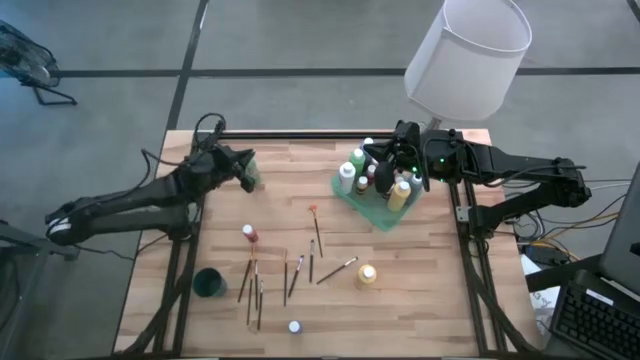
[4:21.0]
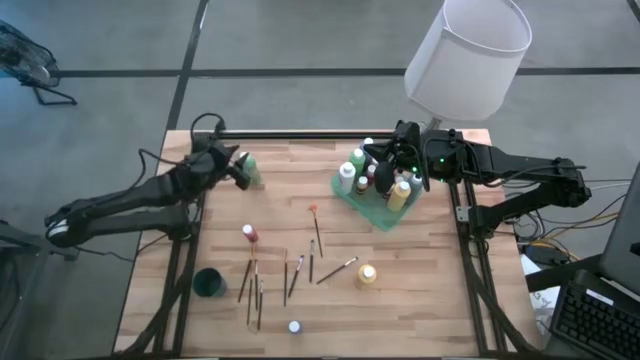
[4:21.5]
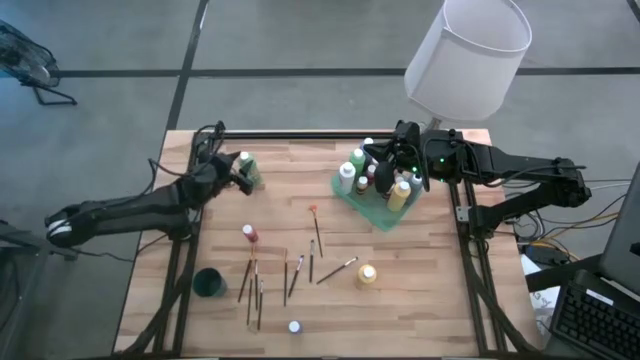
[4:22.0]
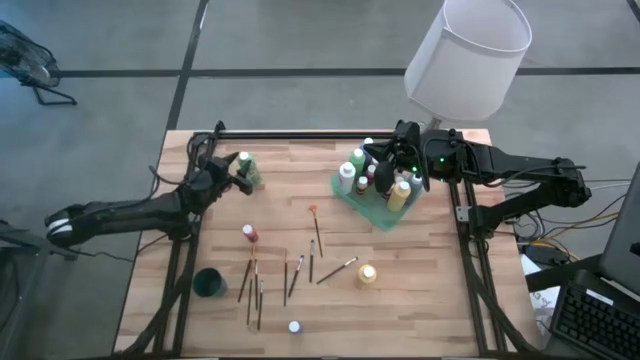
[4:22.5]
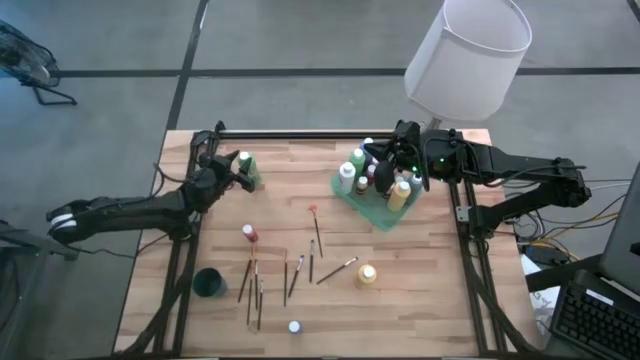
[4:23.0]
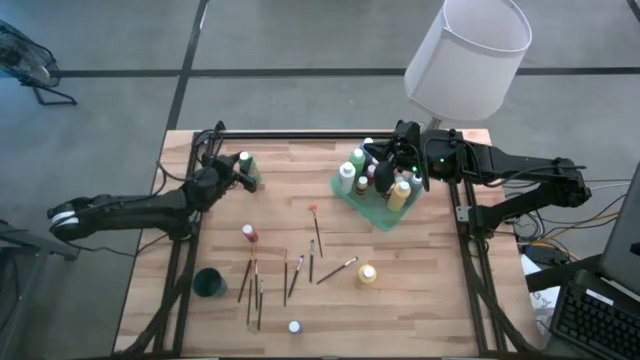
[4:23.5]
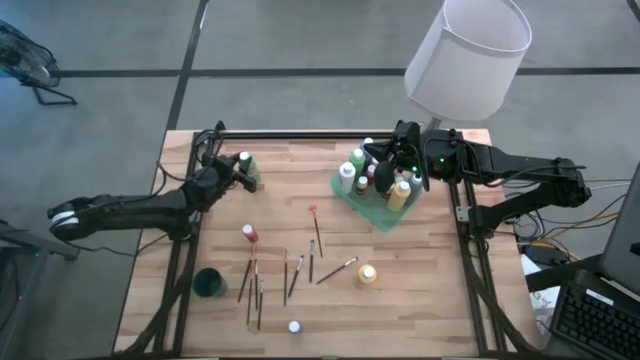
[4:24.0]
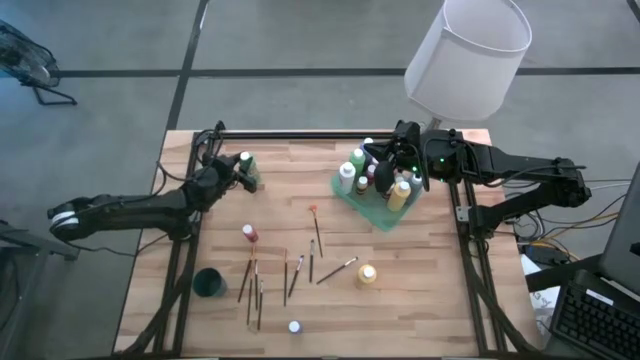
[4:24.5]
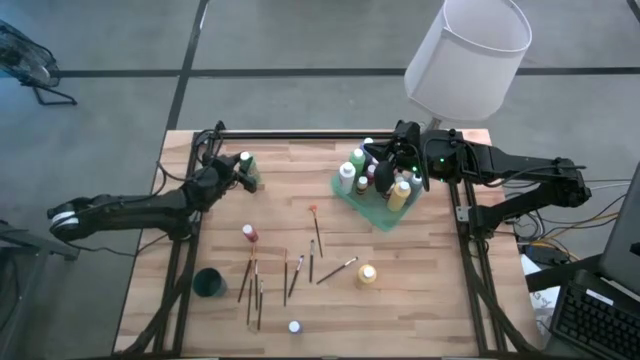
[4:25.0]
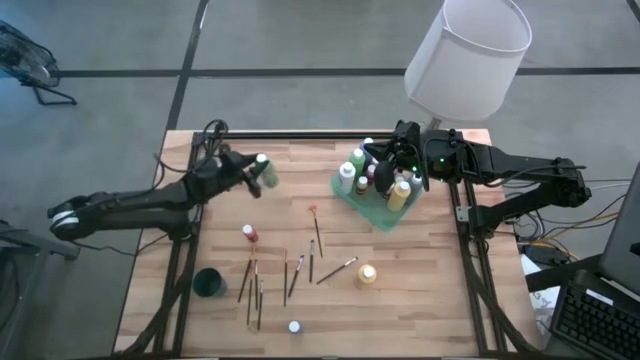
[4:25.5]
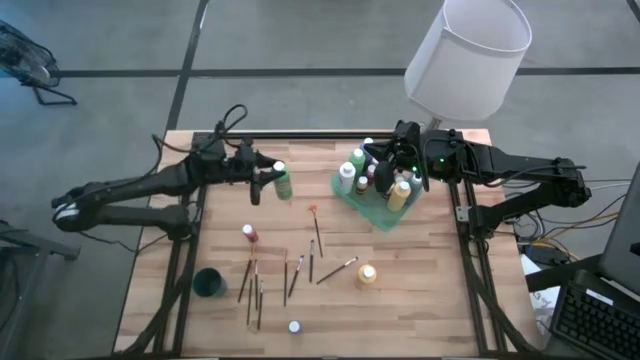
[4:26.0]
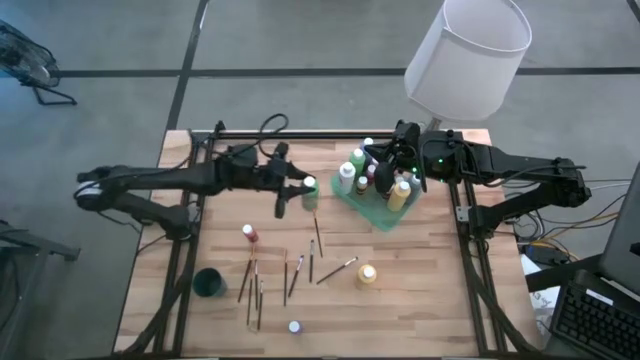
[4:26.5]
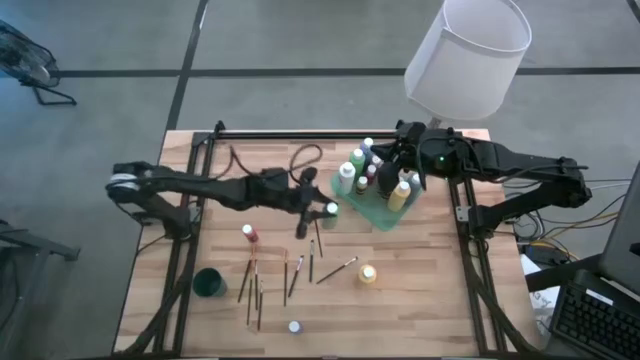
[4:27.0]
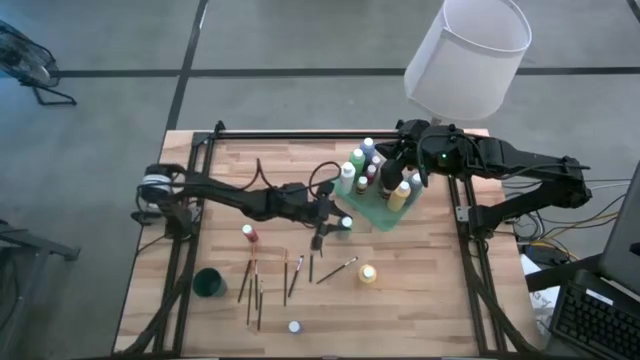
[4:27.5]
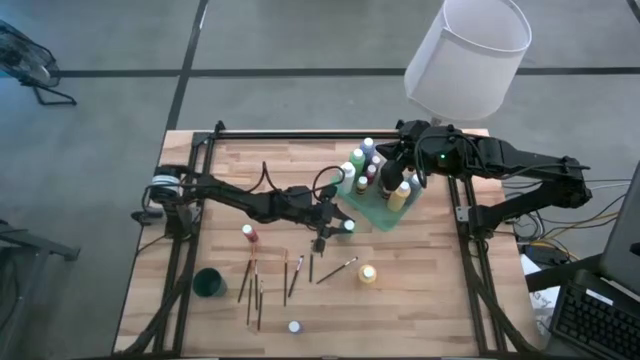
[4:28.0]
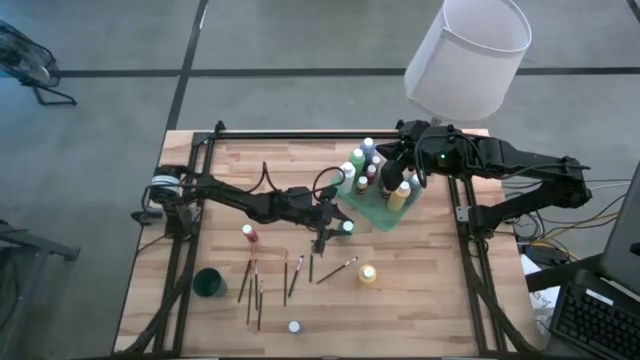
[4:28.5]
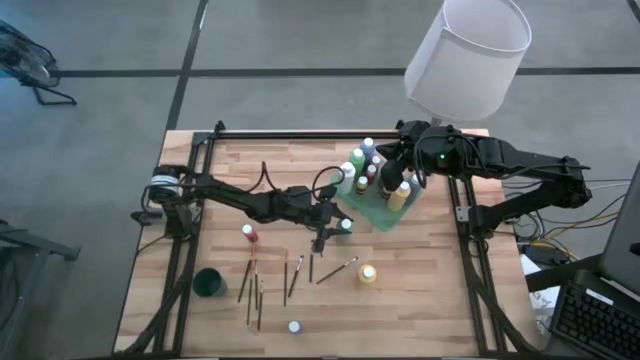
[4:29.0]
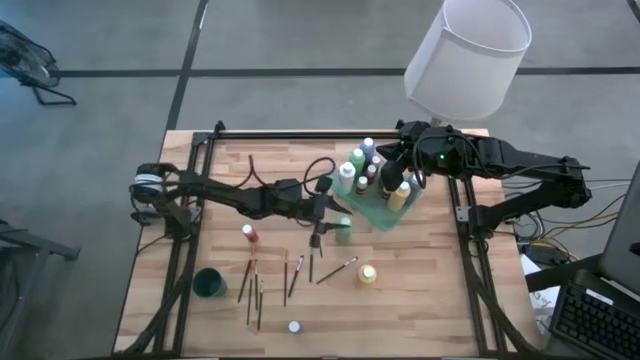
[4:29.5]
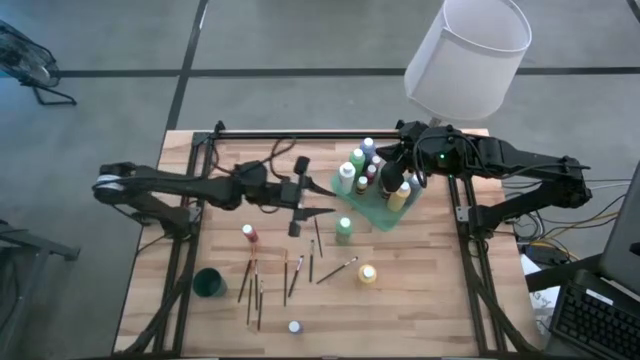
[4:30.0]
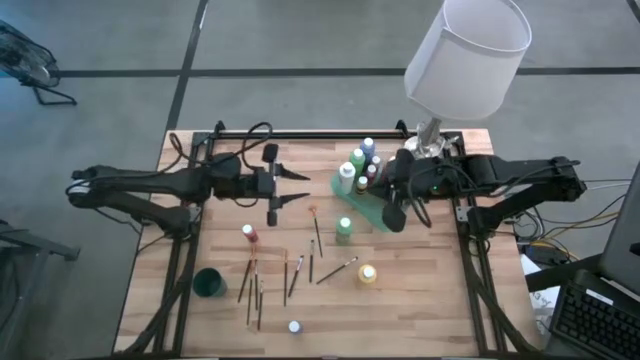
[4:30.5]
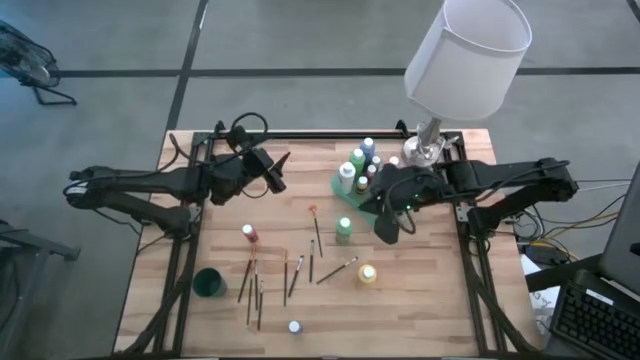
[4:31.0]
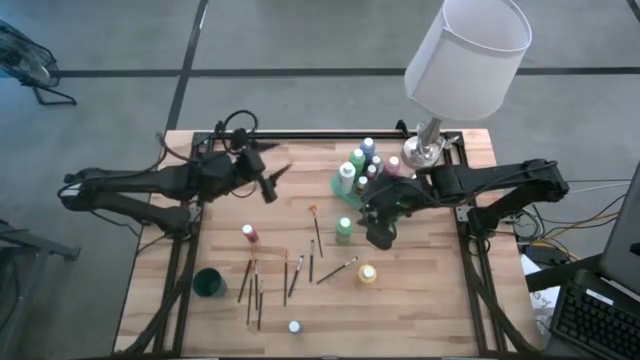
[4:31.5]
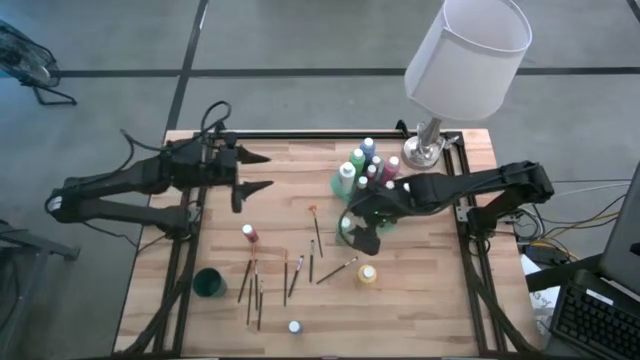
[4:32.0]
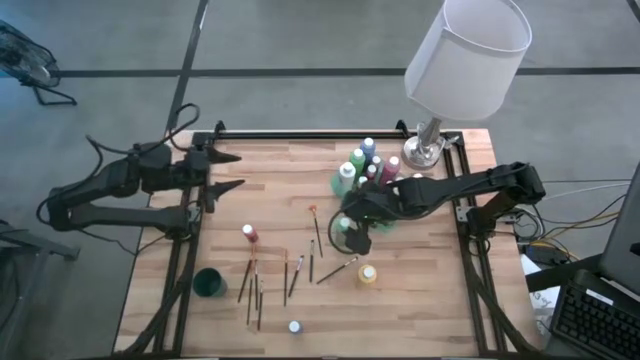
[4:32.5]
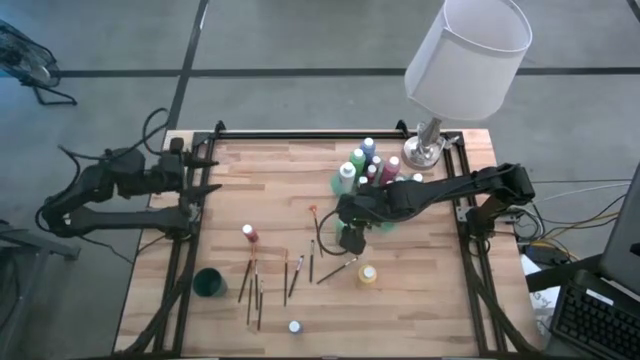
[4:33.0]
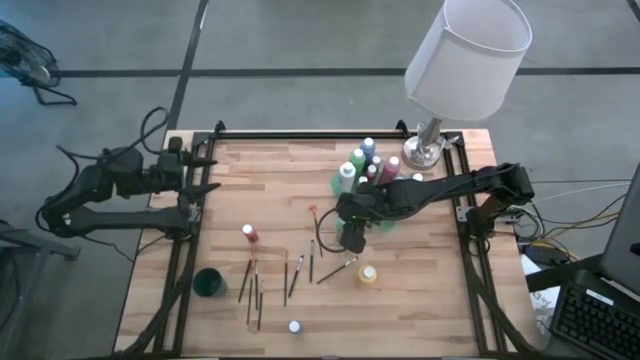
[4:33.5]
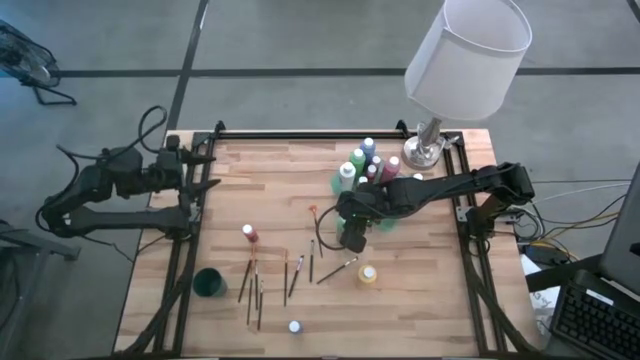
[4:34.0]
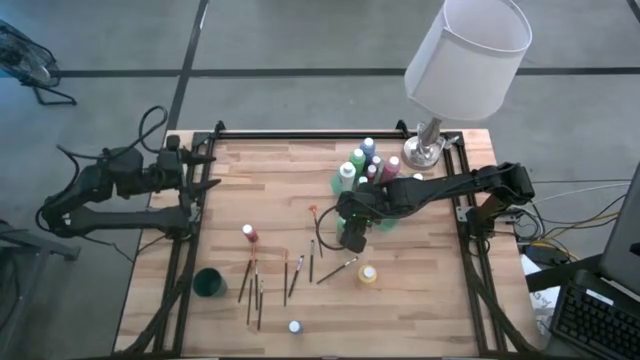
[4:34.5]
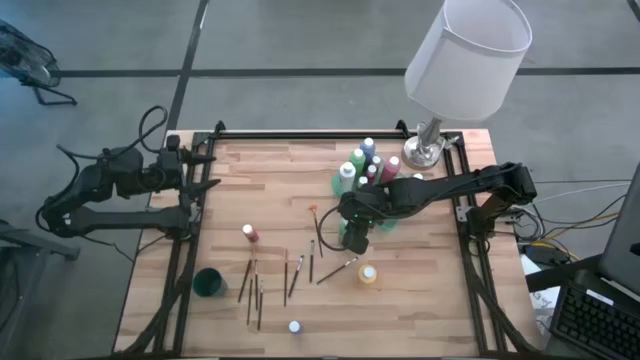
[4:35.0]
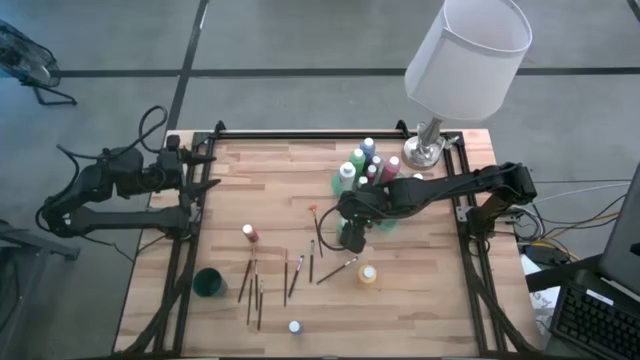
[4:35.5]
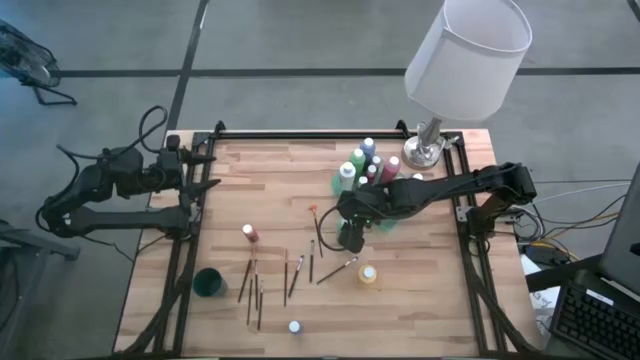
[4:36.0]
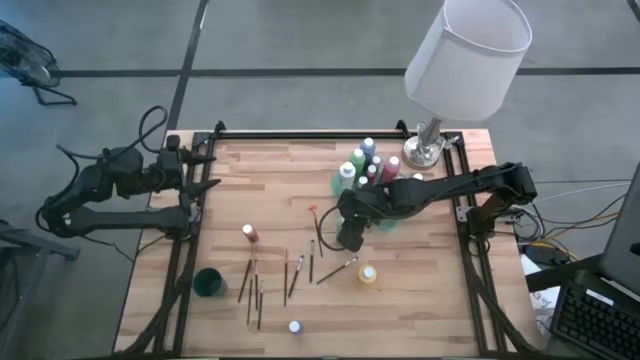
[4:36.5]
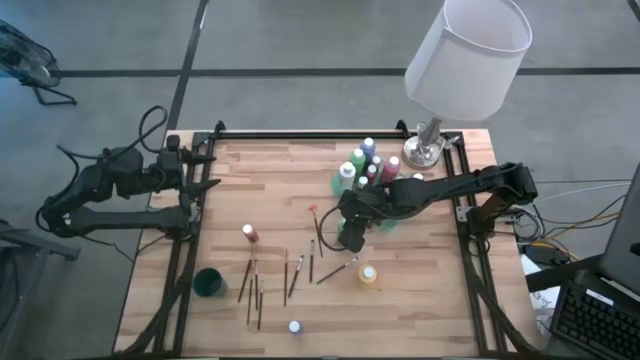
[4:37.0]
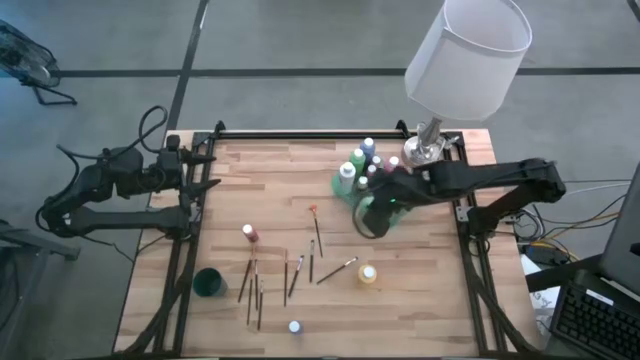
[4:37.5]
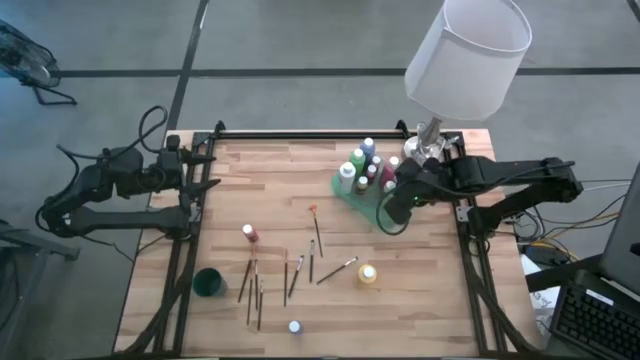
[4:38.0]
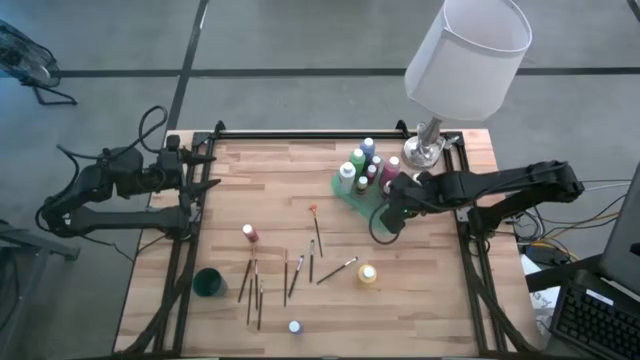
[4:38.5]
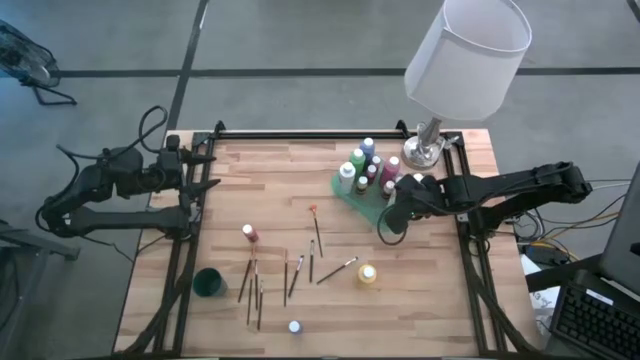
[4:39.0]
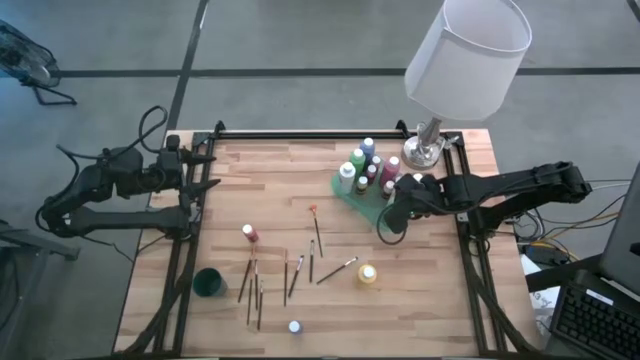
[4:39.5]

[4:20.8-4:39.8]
Task: Pick & Place Paint Supplies
Put the big green paint bottle into the green bin

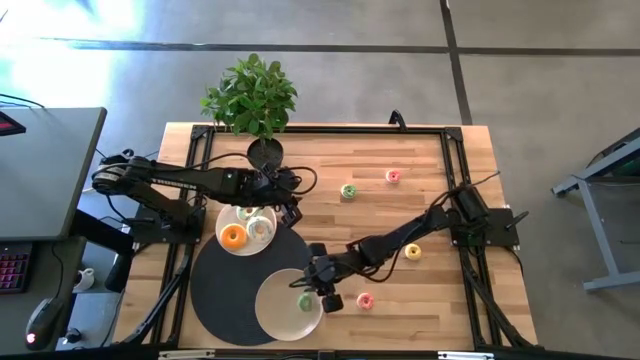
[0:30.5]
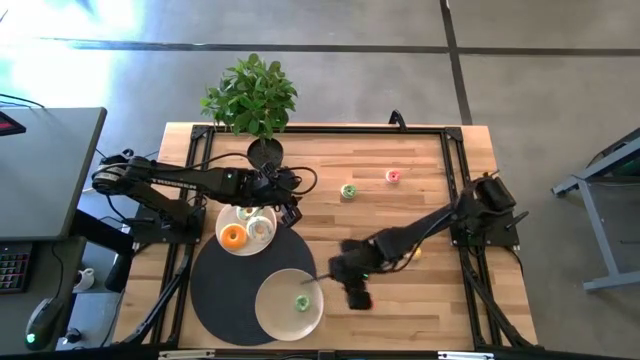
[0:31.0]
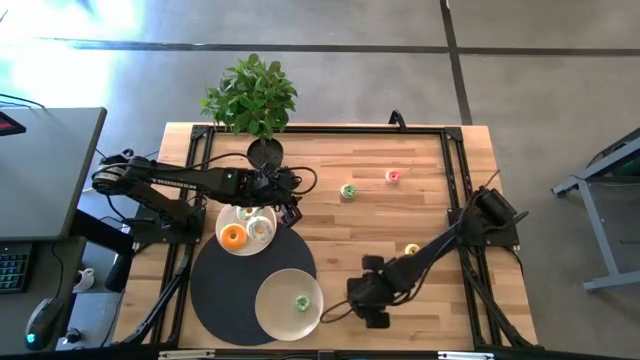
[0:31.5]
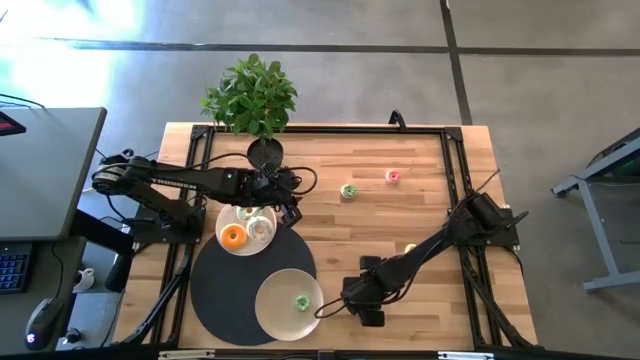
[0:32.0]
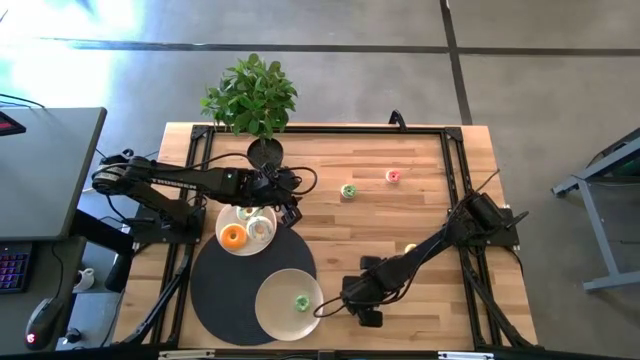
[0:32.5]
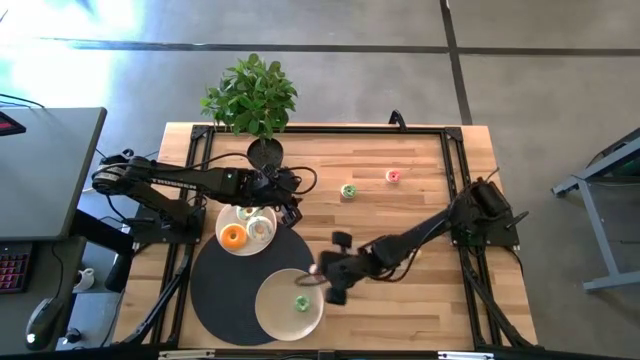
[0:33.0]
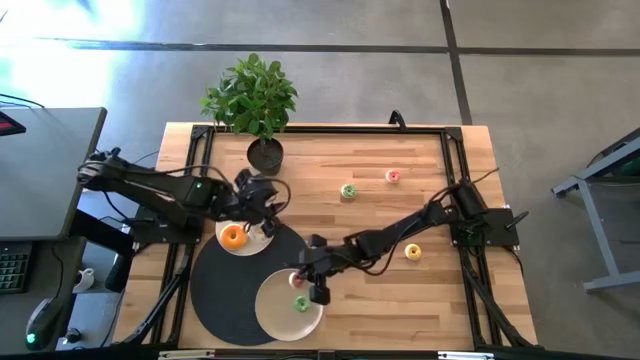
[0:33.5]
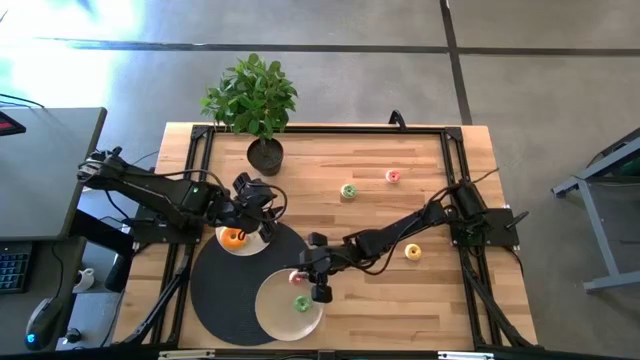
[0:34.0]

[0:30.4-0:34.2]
Task: Pick & Place donuts
Put the small bottom pink donut on the light brown plate
